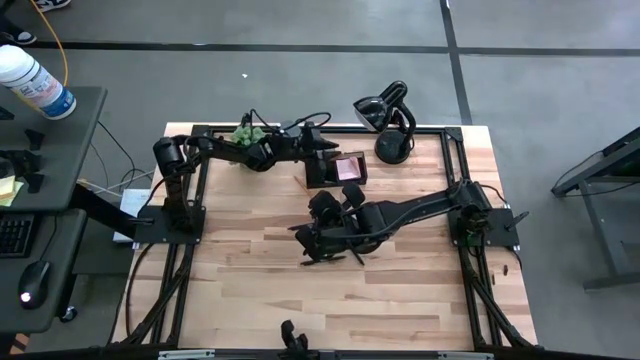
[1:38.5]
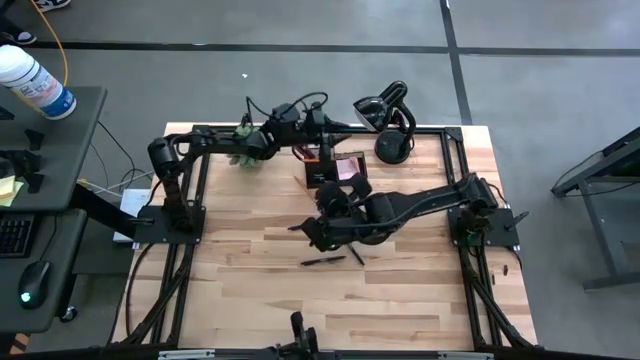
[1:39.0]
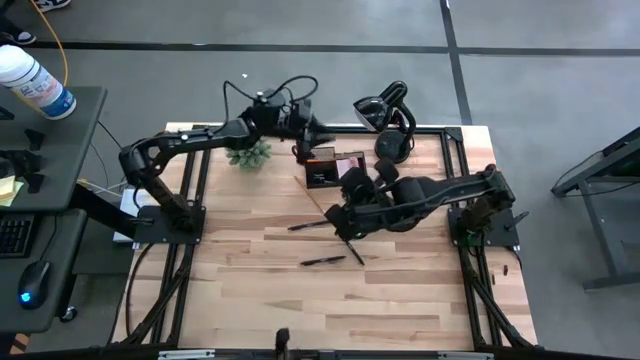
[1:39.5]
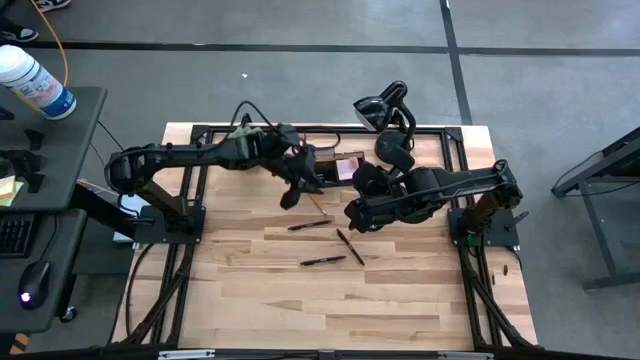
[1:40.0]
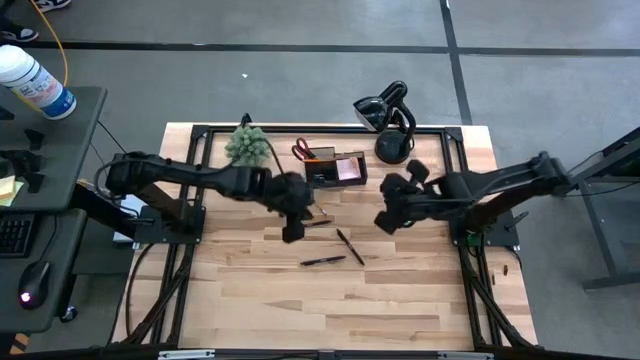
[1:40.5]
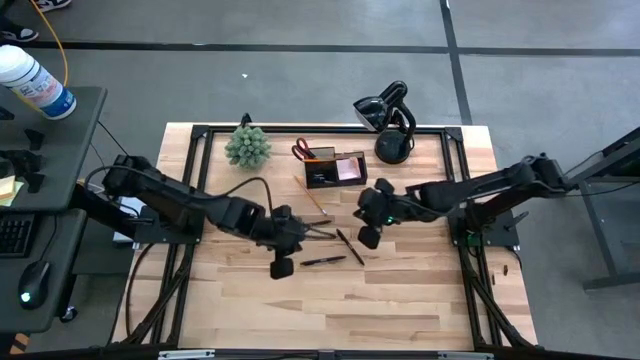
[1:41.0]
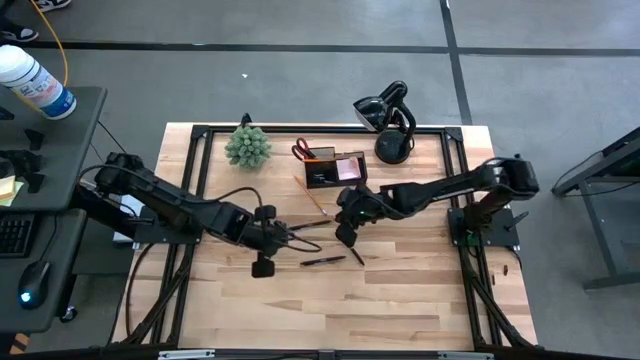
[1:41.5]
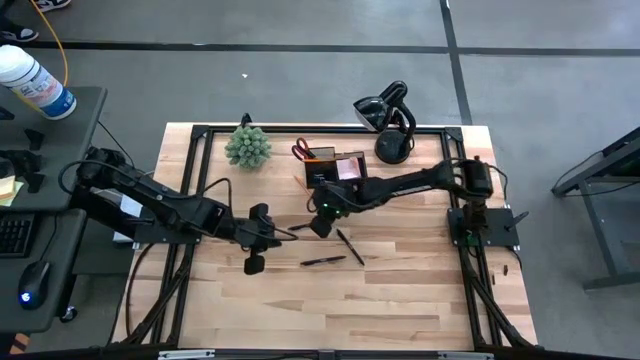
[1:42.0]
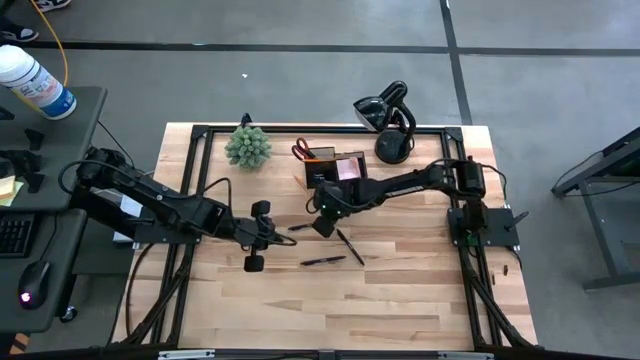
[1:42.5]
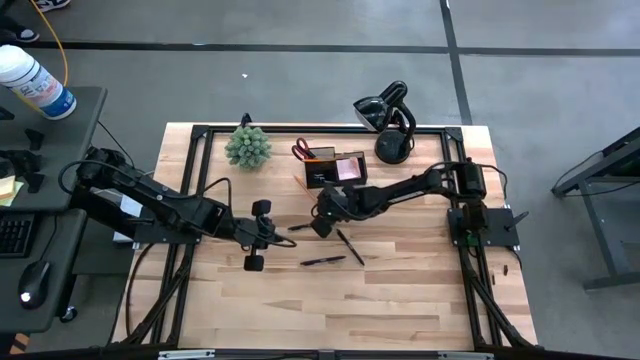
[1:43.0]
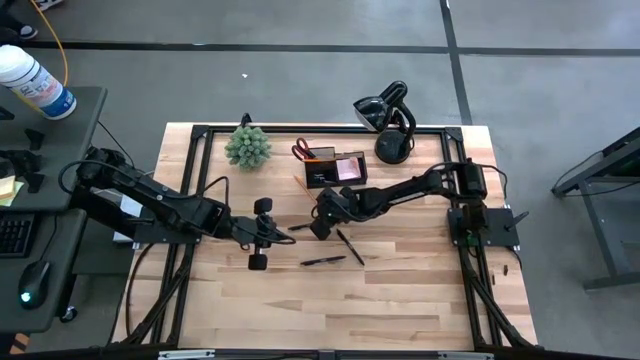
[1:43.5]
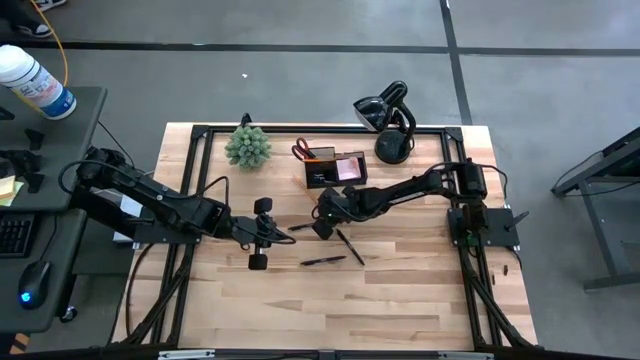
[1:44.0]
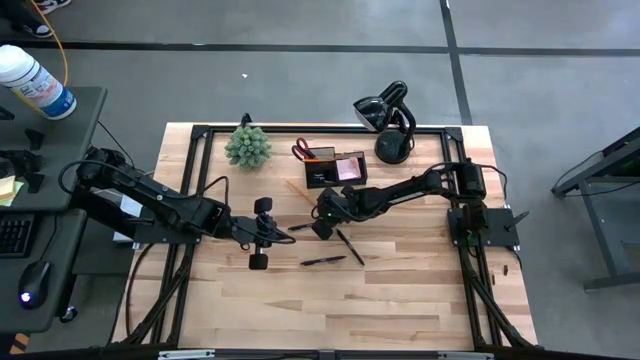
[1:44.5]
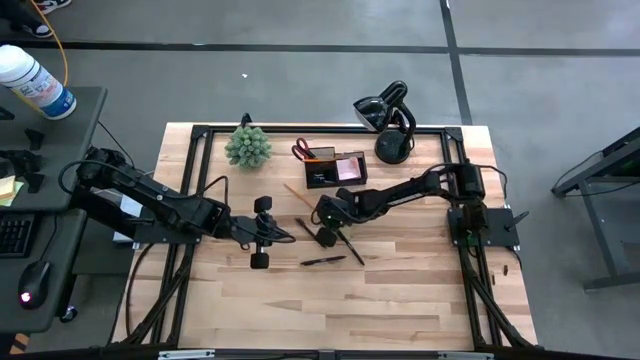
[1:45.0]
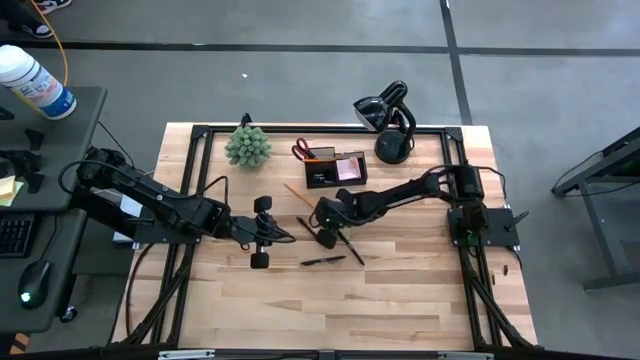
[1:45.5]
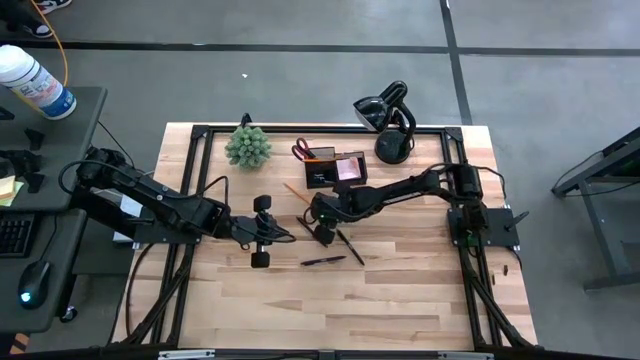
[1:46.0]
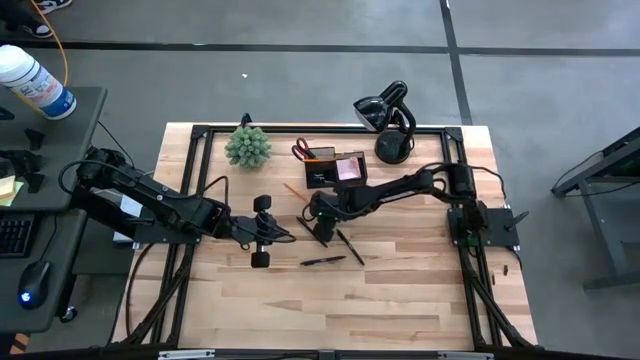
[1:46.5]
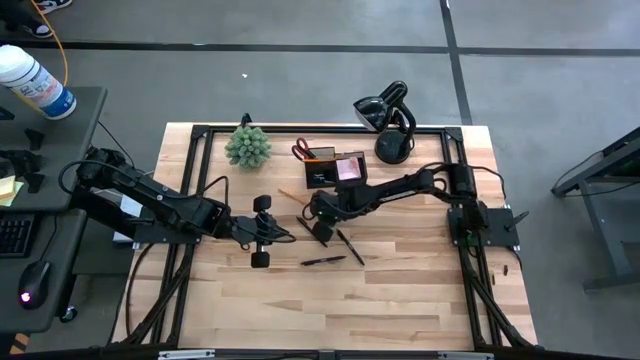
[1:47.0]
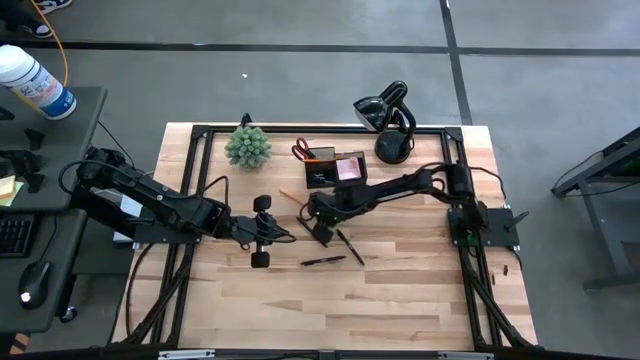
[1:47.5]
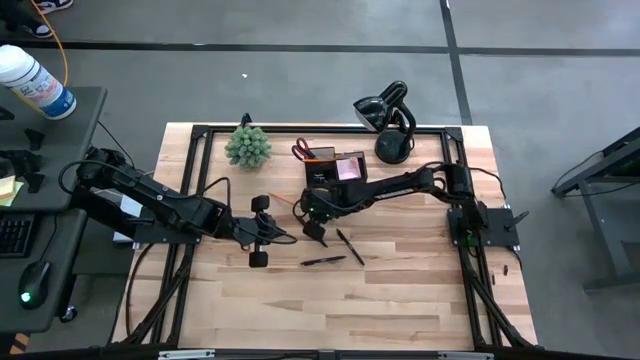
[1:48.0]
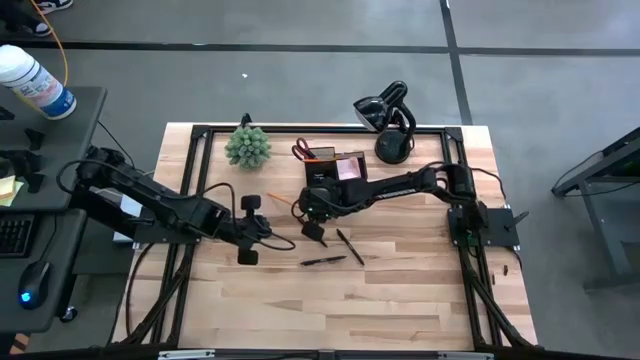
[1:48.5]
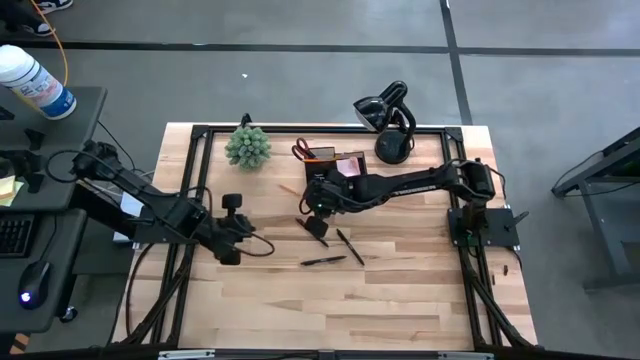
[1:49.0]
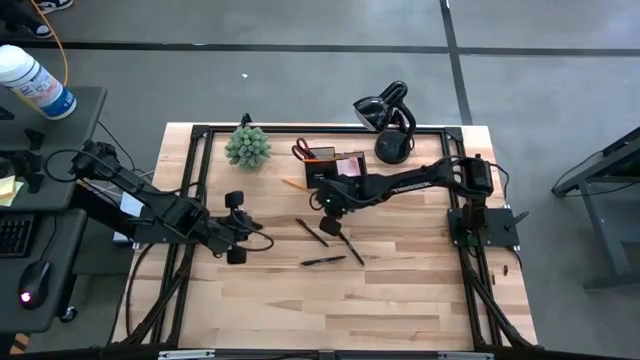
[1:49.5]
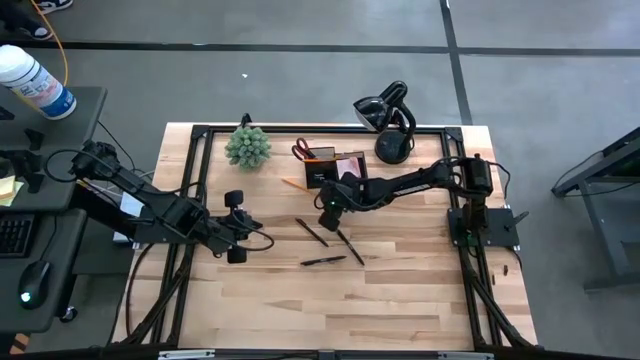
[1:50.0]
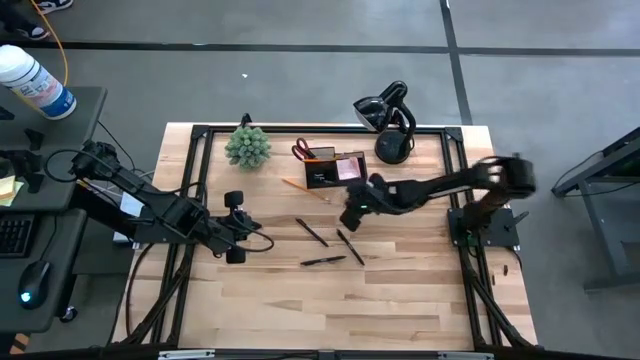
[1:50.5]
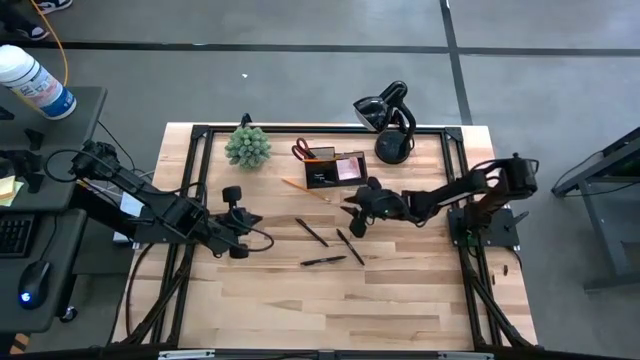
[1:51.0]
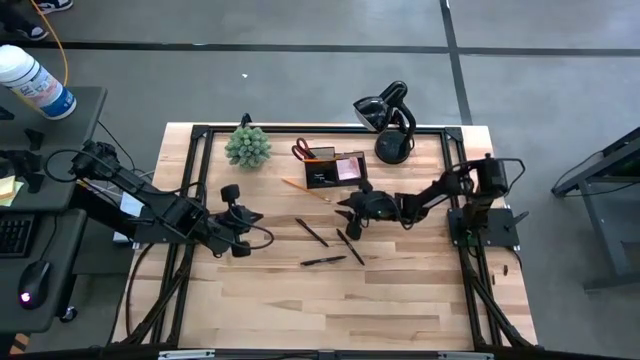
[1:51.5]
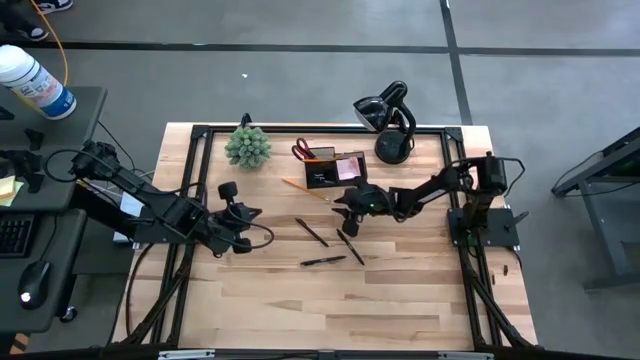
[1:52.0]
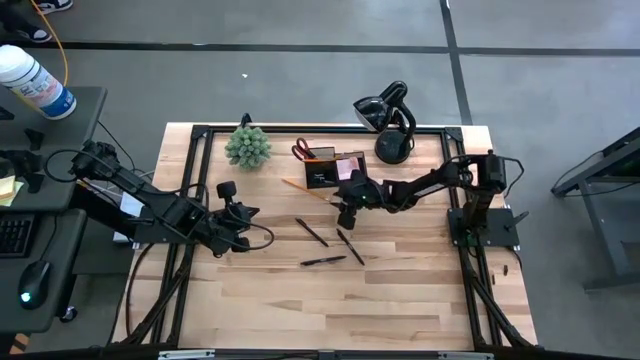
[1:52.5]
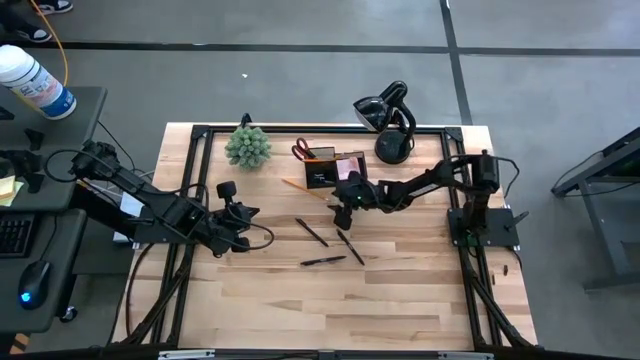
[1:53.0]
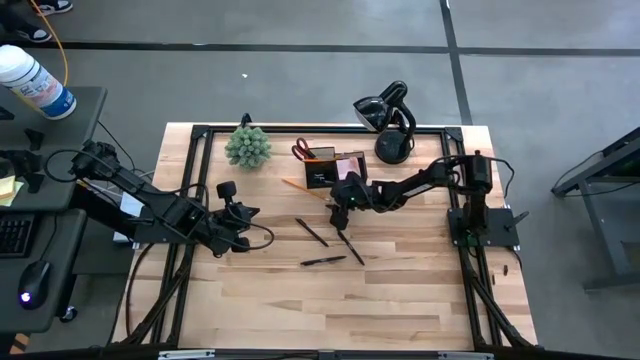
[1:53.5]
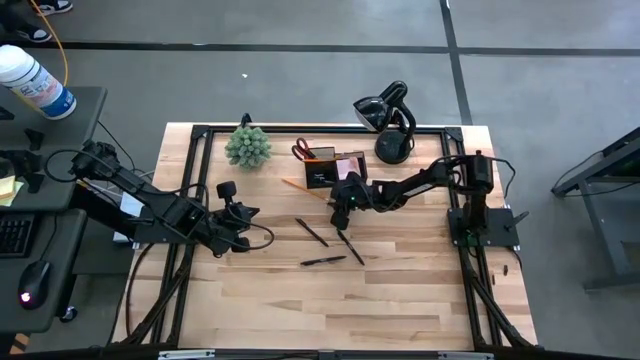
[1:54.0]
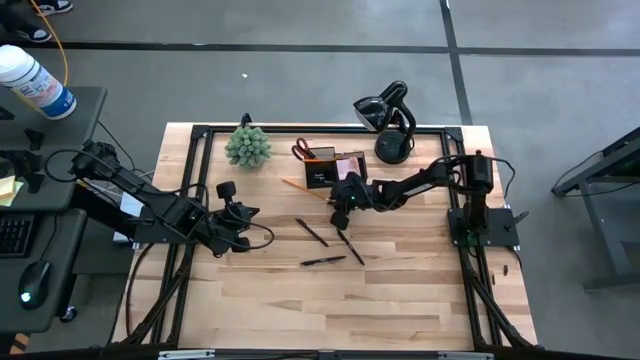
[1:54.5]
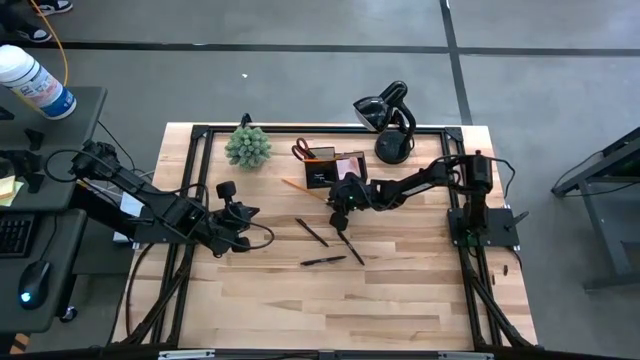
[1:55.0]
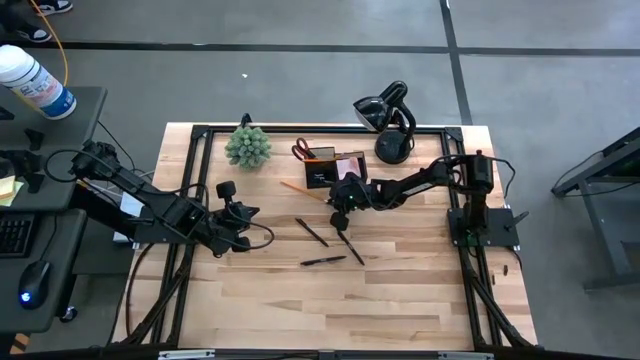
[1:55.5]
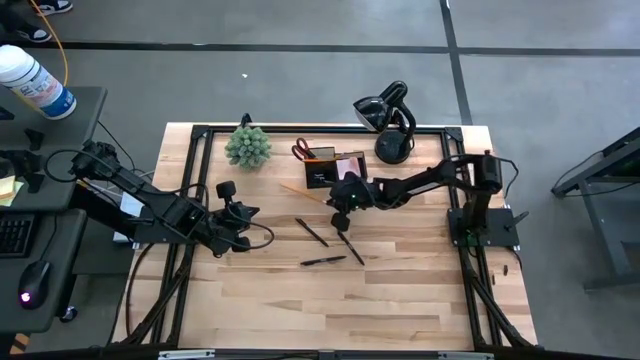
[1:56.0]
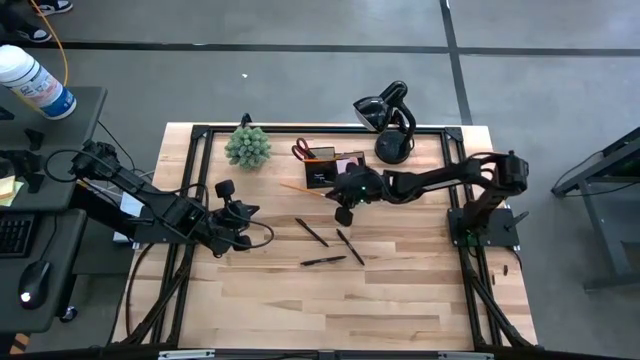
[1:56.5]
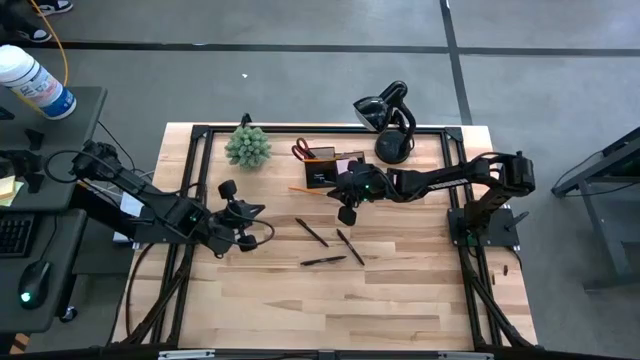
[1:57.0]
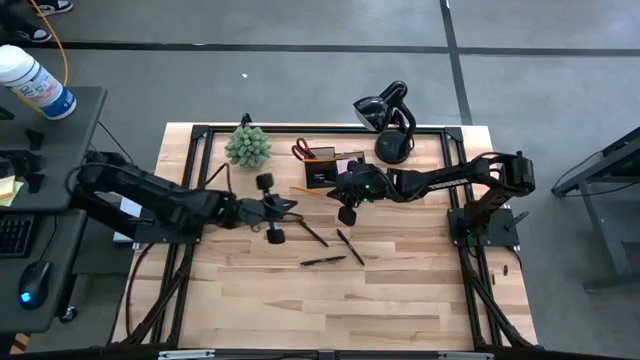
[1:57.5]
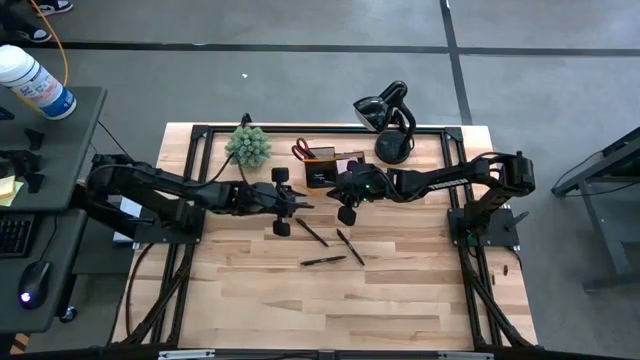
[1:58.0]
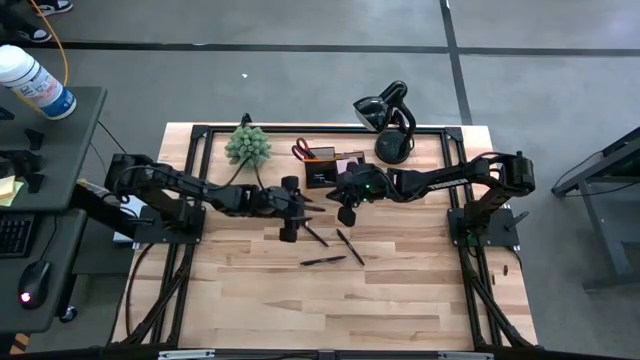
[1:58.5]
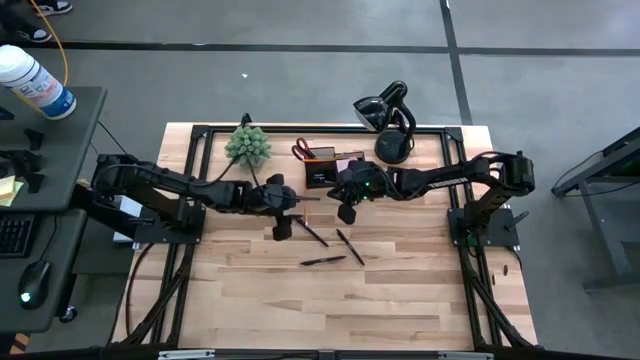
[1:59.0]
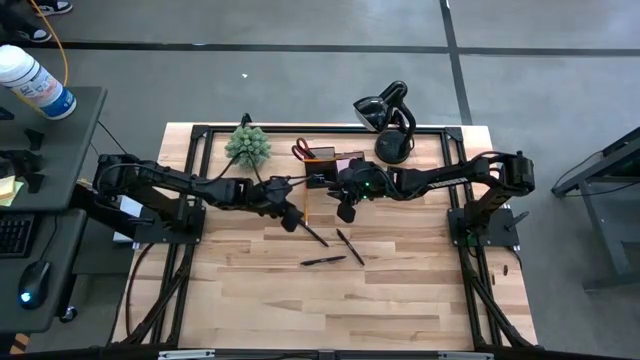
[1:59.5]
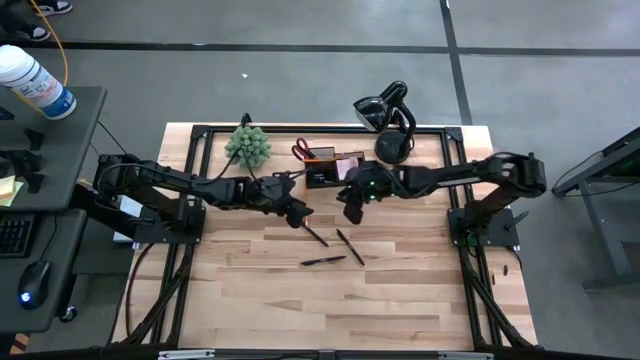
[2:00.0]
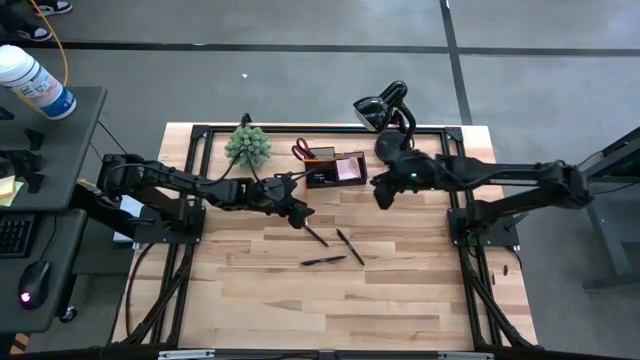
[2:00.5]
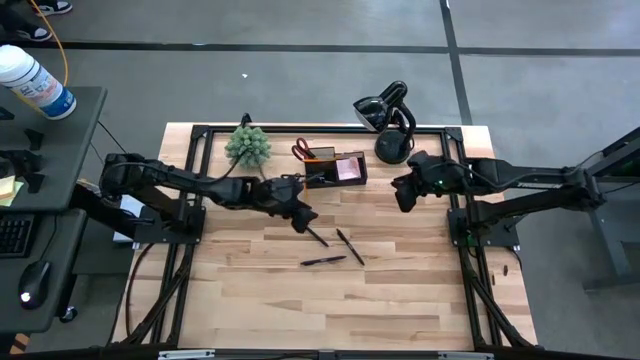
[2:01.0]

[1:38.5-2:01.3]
Task: Pick and place office supplies into organizer
Put the orange pencil into the black desk organizer
